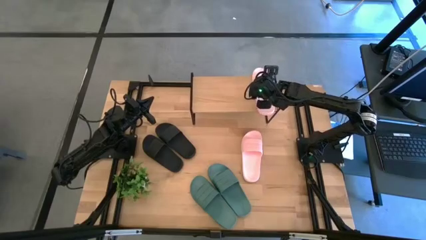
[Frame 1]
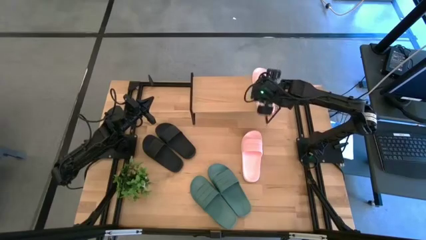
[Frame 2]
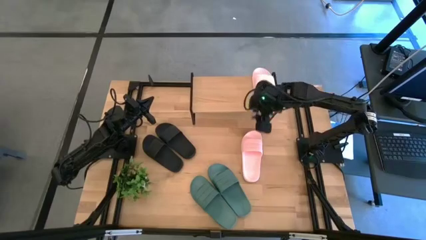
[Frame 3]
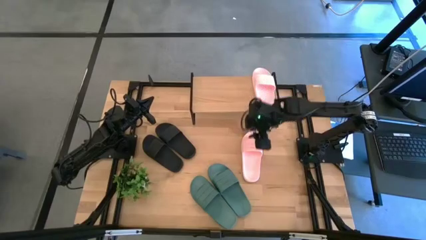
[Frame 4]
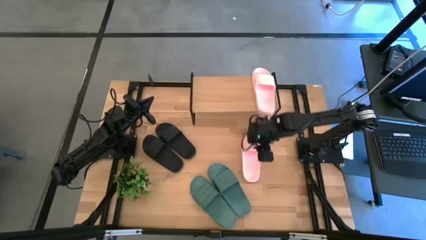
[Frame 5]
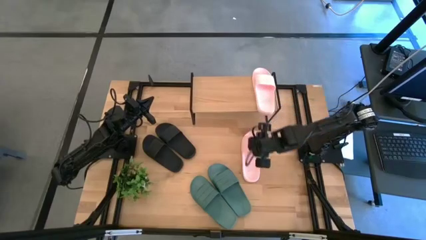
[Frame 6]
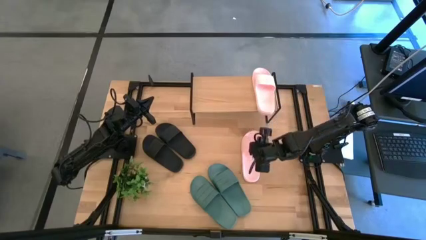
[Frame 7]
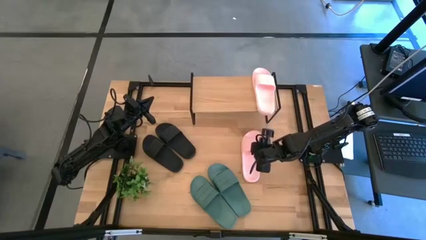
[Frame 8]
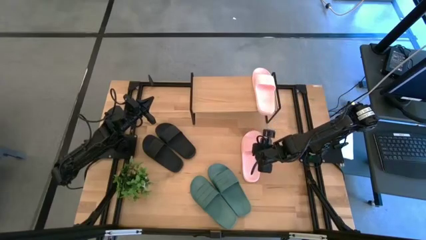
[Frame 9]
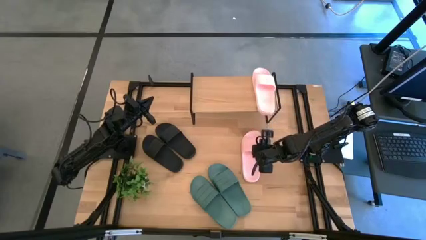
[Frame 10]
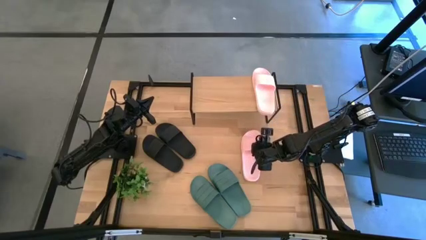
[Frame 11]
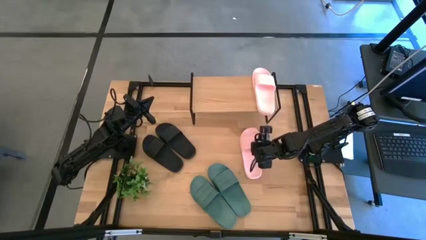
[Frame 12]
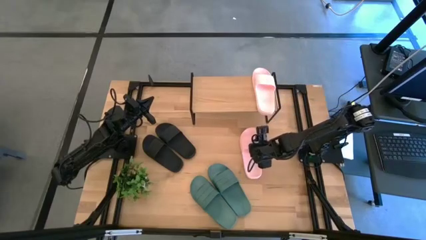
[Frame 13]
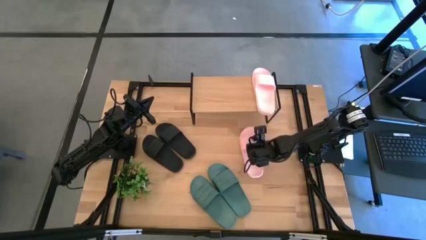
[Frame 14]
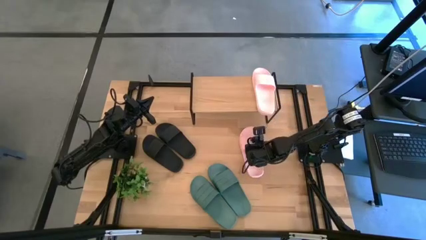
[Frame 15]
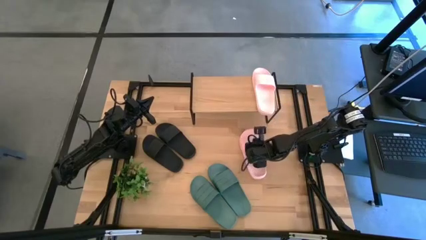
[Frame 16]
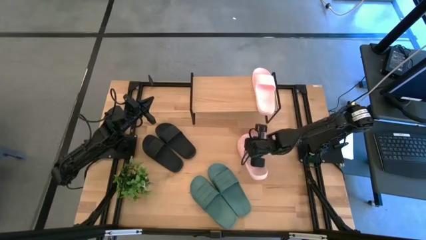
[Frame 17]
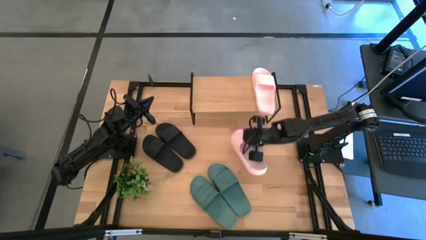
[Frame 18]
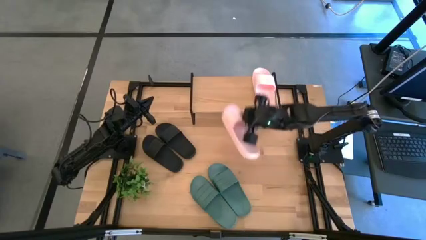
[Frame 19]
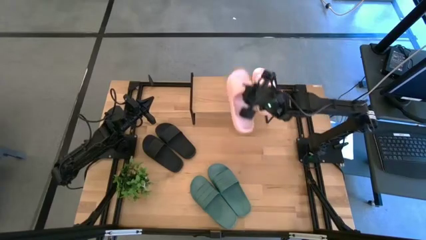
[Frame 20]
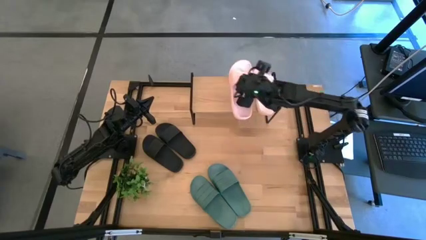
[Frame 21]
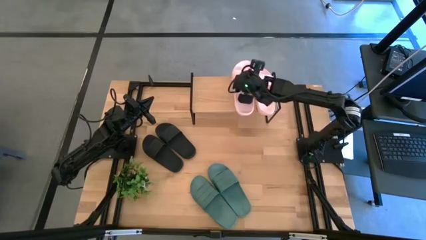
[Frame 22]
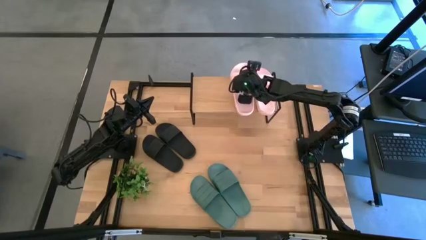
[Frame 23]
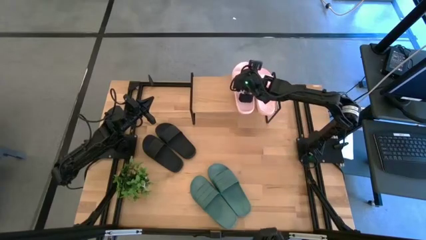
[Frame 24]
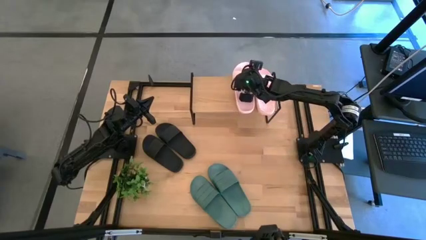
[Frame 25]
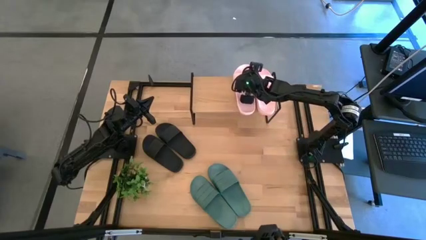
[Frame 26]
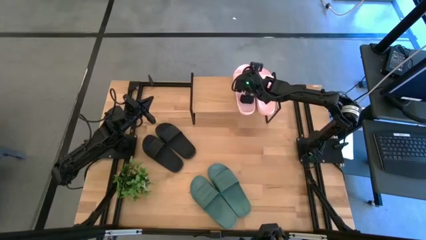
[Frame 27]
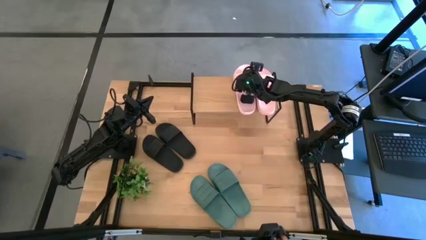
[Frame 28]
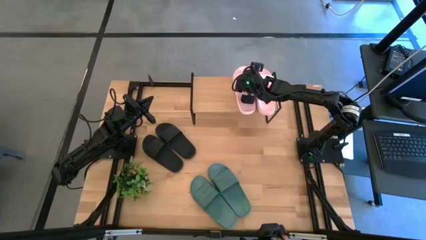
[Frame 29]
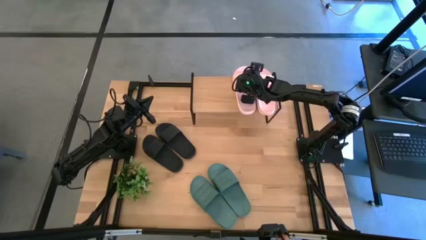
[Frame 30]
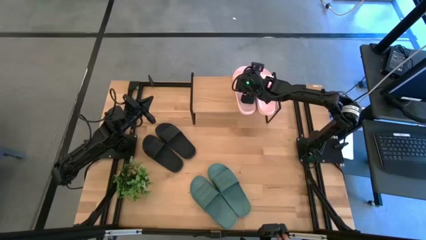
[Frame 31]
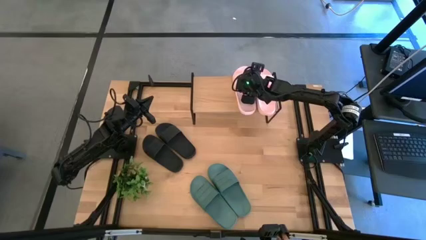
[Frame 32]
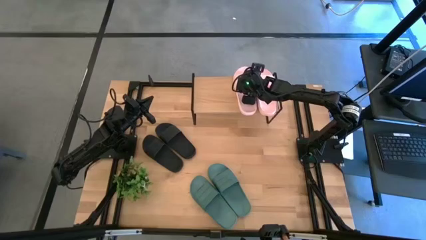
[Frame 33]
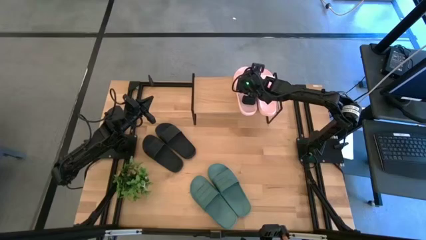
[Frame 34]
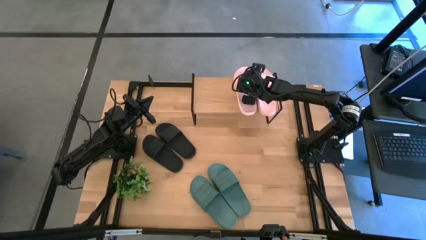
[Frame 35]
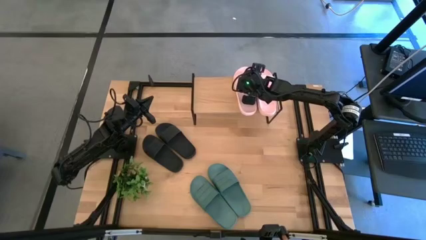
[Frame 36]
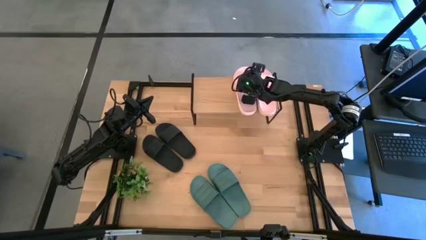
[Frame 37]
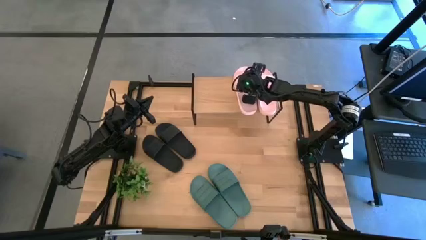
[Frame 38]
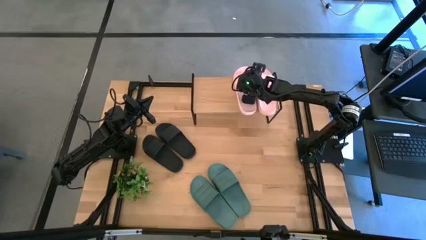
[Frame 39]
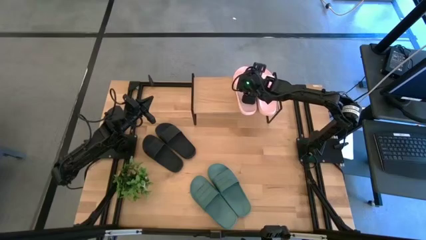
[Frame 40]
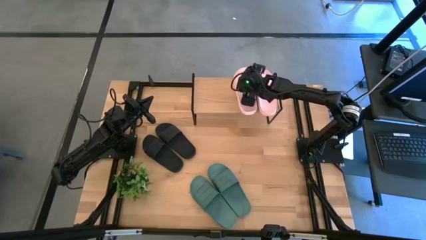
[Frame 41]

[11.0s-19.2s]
Task: Pick and place slides into the shelf
Put the pink slide on the shelf

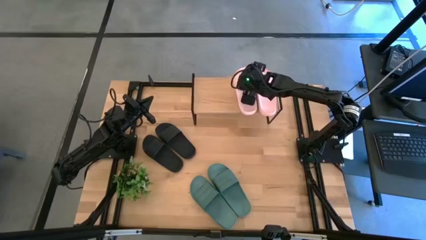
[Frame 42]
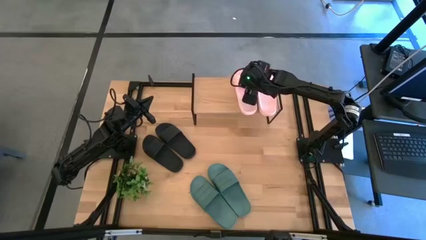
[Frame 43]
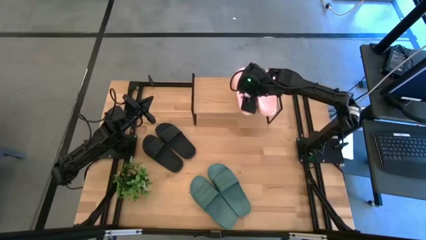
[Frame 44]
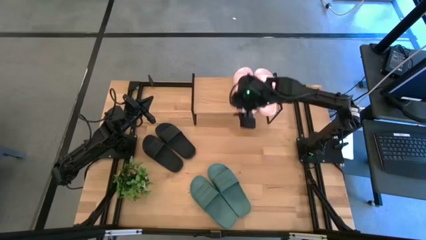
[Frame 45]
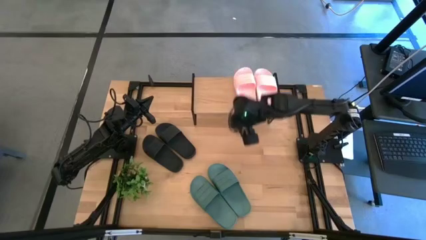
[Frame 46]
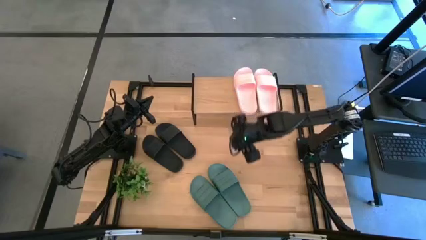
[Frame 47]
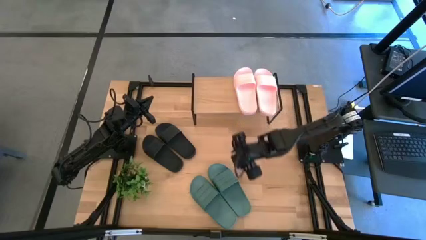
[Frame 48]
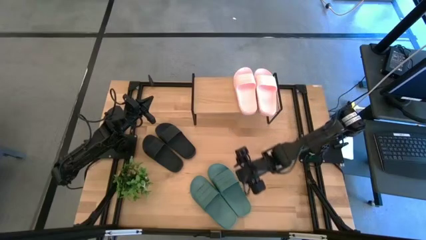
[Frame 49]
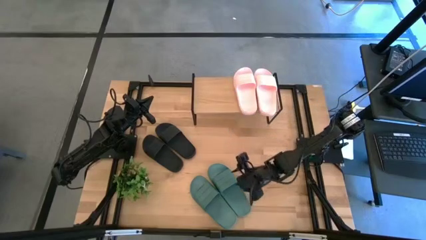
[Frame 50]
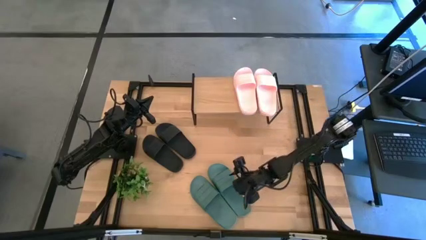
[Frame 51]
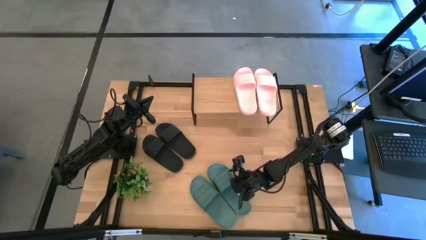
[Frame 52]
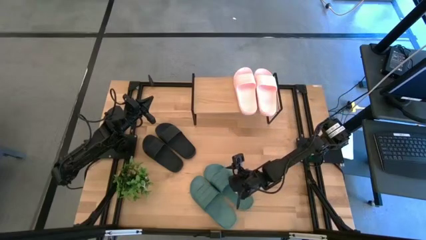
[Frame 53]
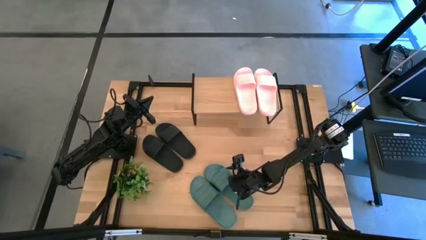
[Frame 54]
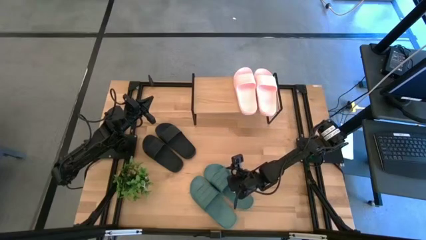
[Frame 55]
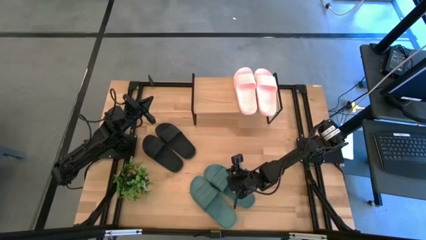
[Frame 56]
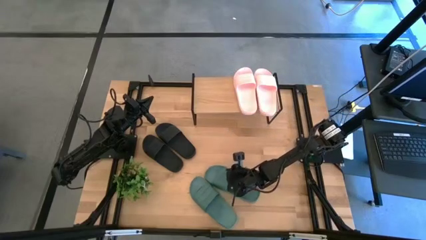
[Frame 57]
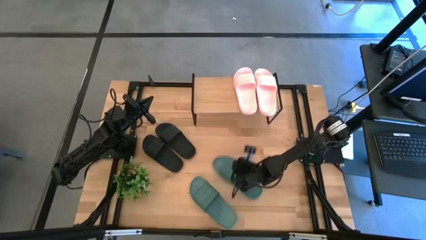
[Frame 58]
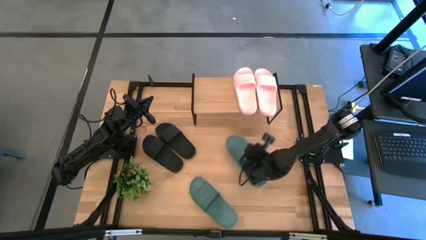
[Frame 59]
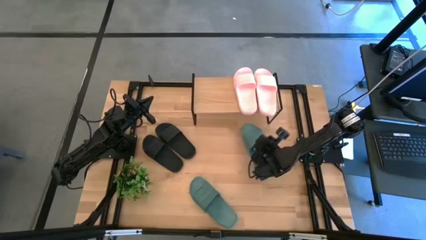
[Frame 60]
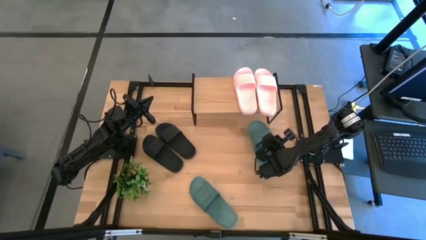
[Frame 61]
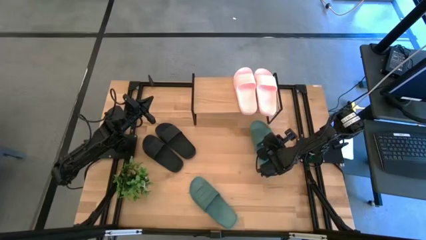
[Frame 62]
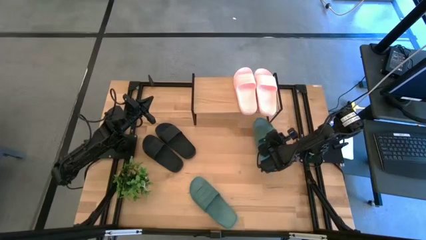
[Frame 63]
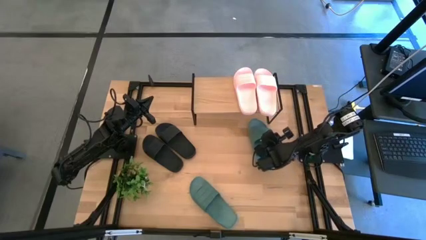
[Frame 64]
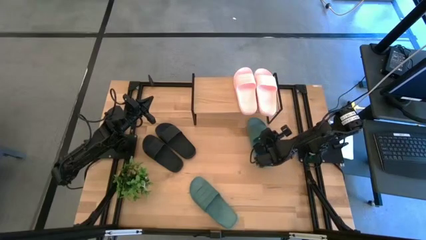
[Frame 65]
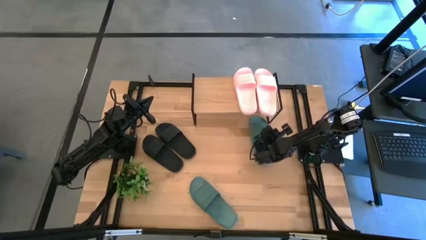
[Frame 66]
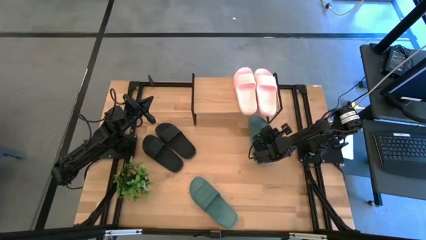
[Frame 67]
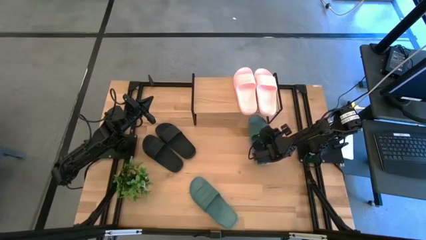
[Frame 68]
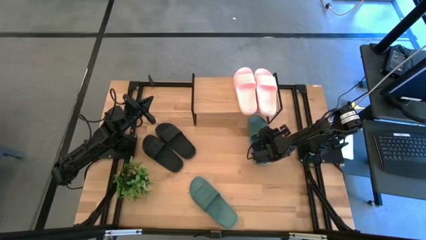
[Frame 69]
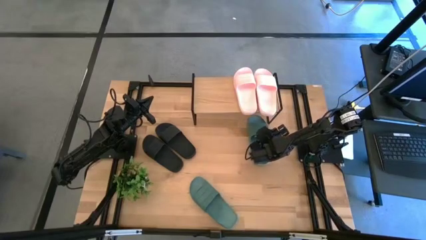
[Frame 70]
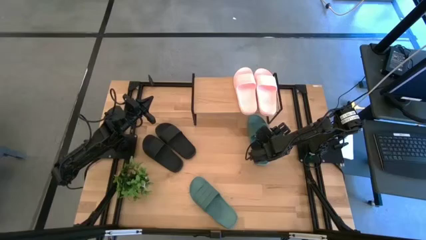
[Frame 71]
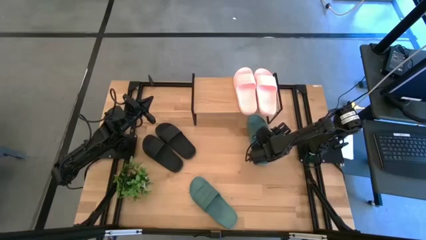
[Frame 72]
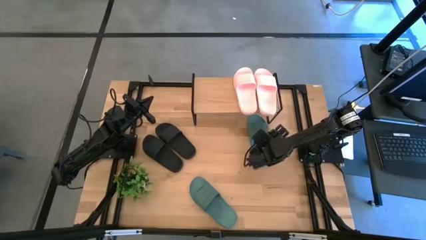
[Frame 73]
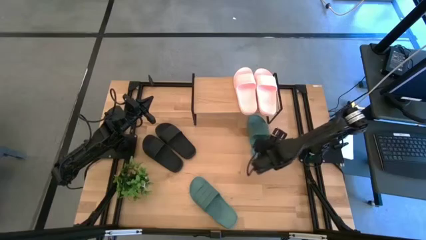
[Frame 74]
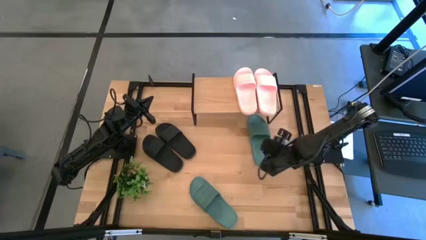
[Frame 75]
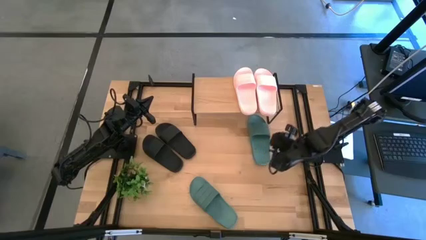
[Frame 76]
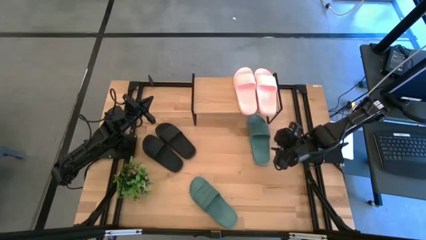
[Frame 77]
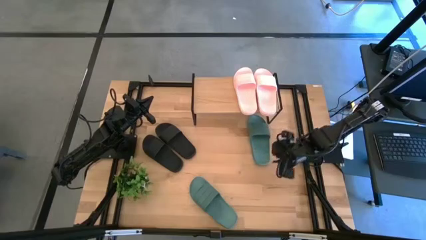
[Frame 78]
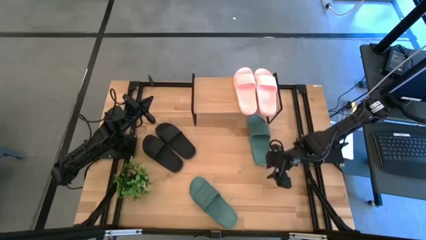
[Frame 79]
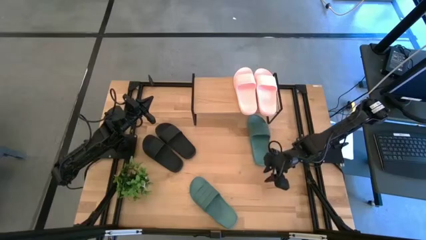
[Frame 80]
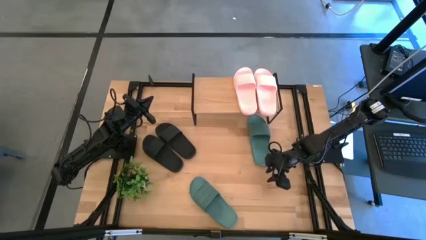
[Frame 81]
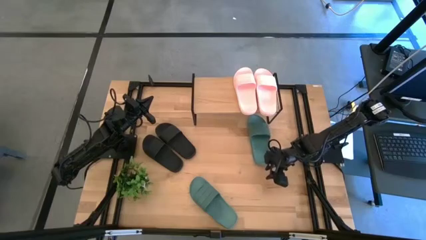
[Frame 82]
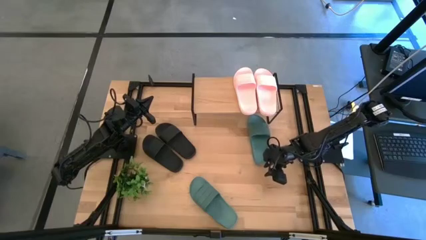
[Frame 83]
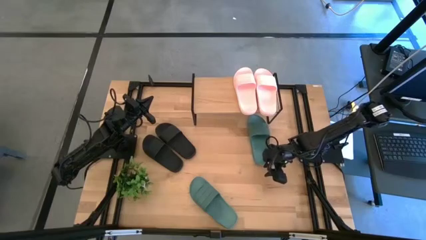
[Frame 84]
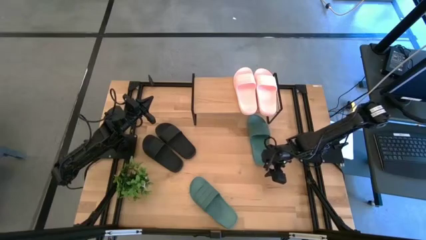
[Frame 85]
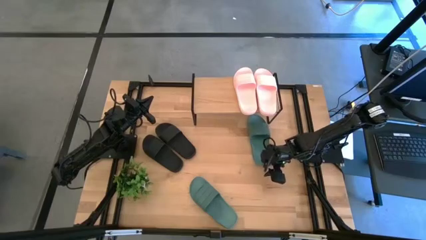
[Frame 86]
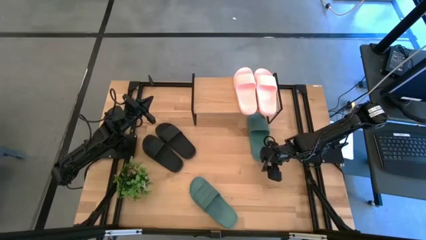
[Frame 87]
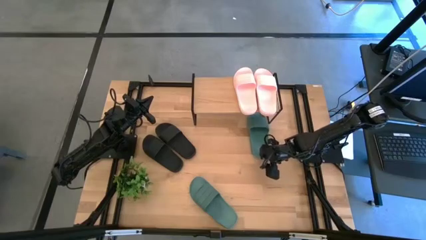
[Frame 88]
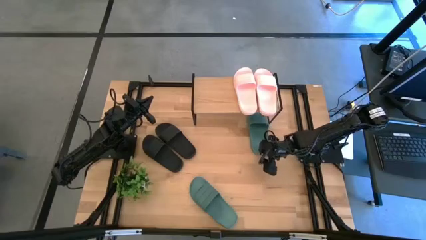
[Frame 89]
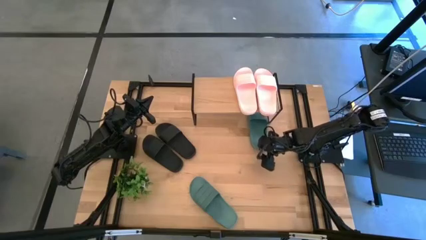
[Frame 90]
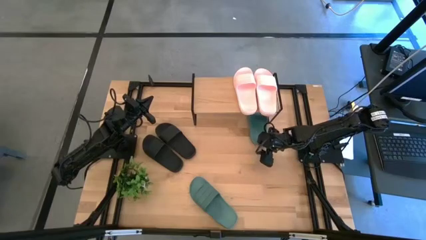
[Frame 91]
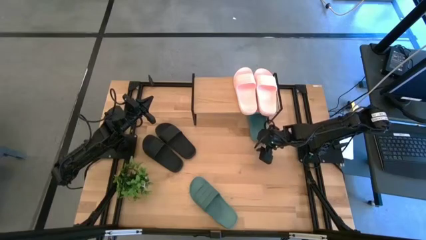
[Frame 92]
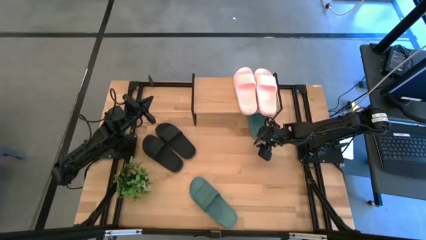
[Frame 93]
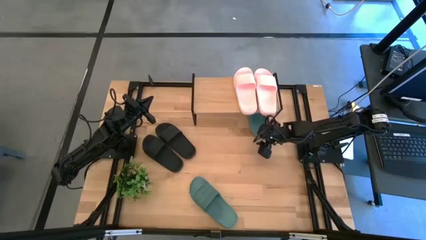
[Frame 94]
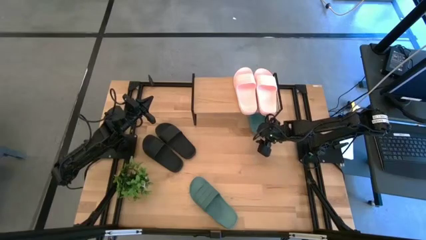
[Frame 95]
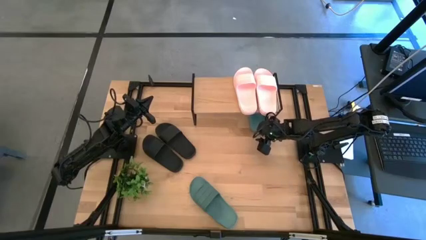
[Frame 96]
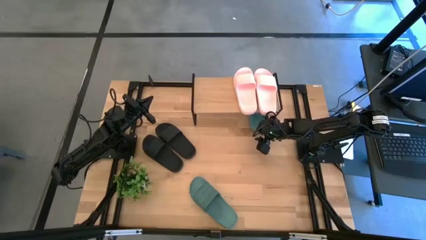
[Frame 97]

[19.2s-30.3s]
Put the right green slide under the shelf
